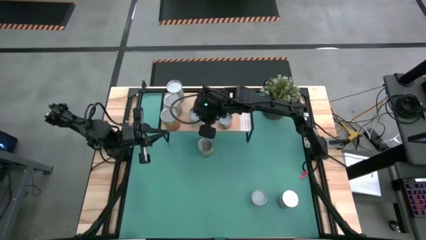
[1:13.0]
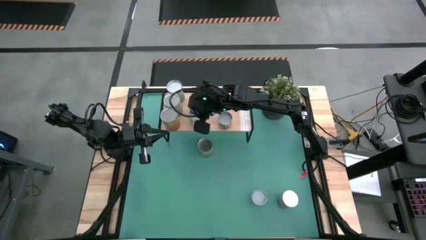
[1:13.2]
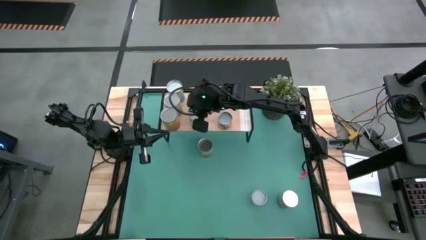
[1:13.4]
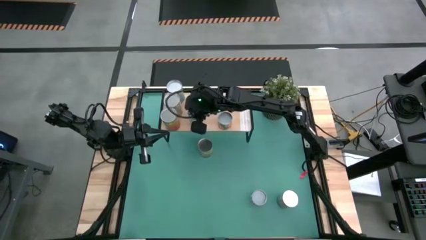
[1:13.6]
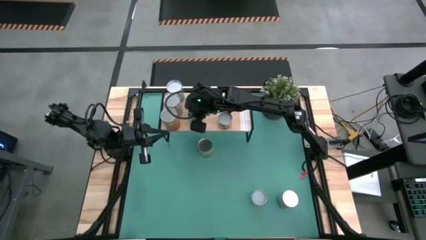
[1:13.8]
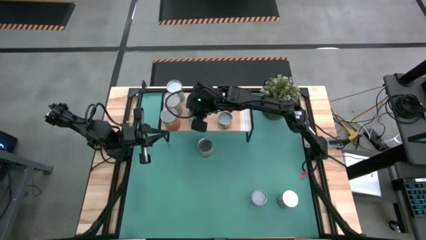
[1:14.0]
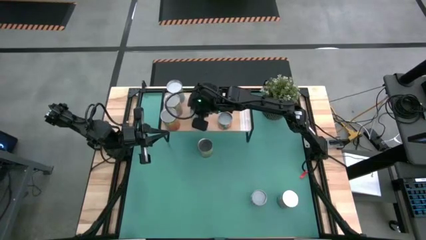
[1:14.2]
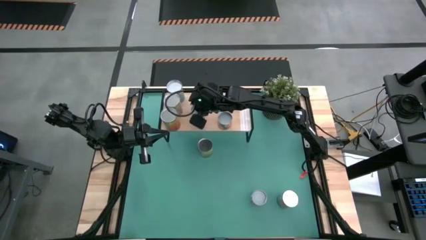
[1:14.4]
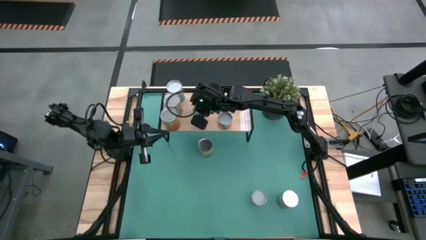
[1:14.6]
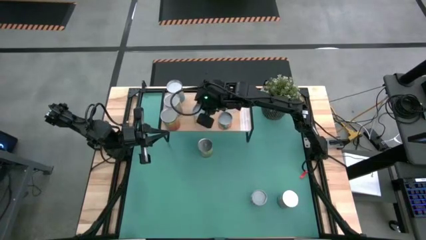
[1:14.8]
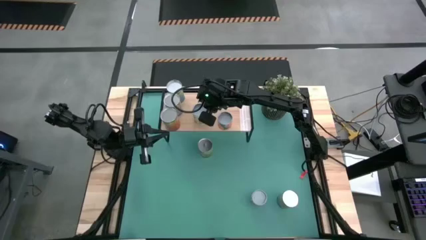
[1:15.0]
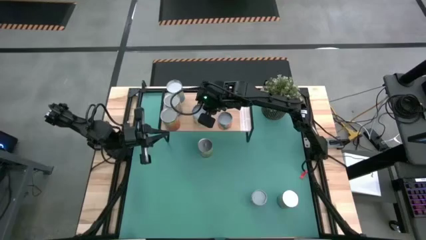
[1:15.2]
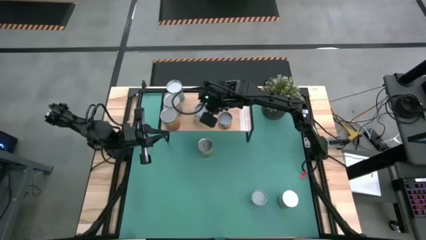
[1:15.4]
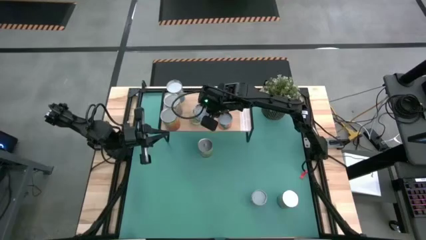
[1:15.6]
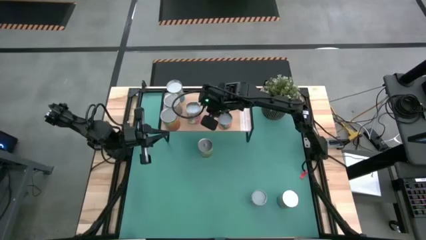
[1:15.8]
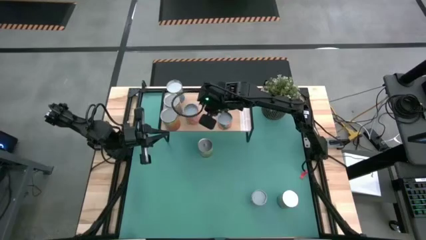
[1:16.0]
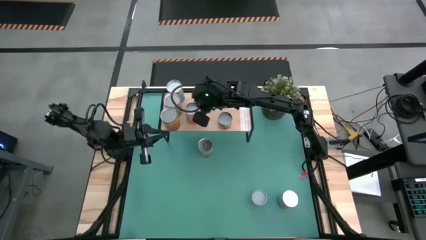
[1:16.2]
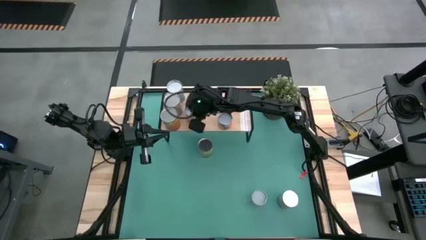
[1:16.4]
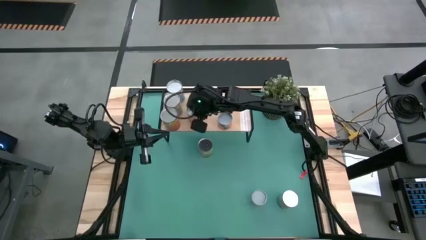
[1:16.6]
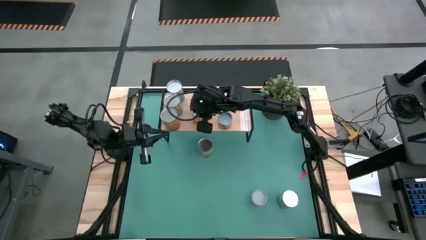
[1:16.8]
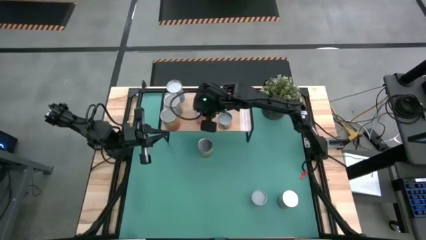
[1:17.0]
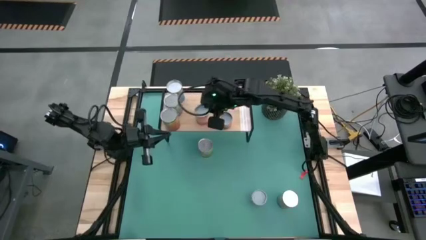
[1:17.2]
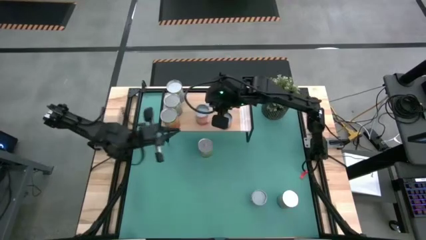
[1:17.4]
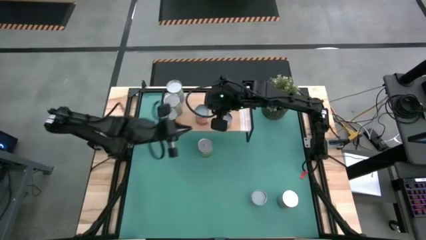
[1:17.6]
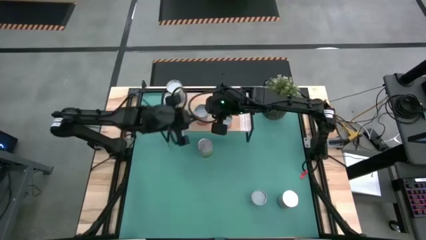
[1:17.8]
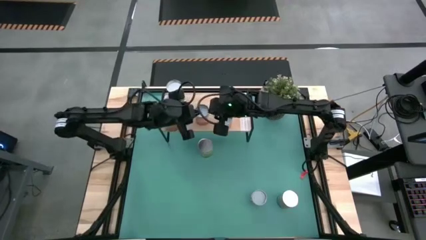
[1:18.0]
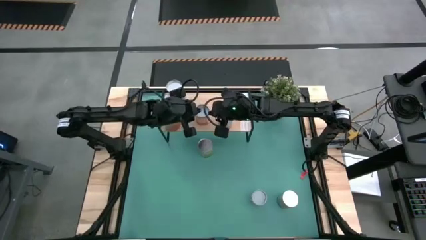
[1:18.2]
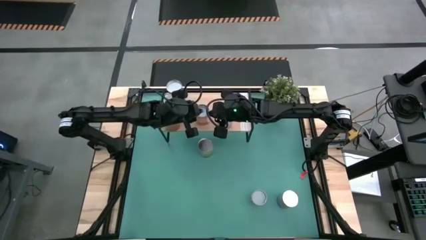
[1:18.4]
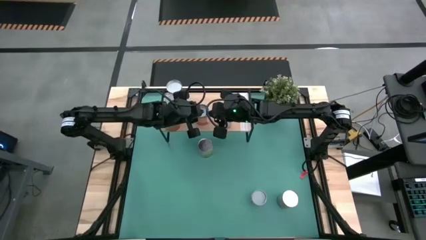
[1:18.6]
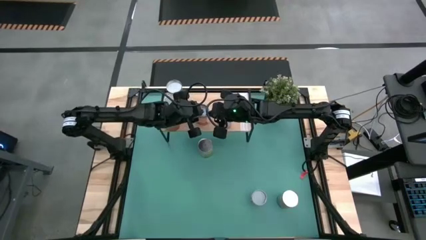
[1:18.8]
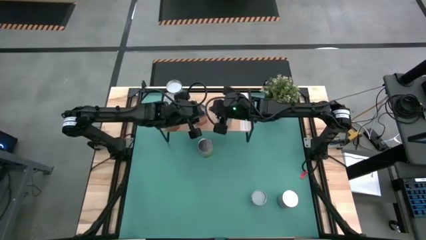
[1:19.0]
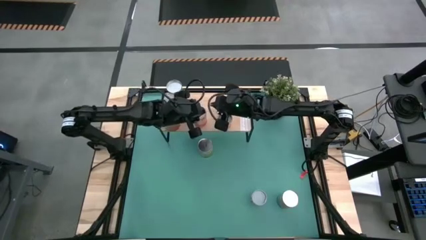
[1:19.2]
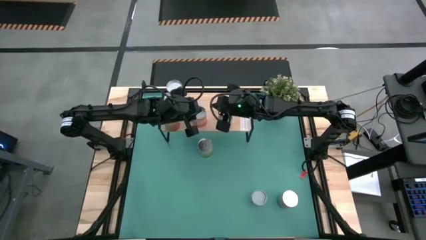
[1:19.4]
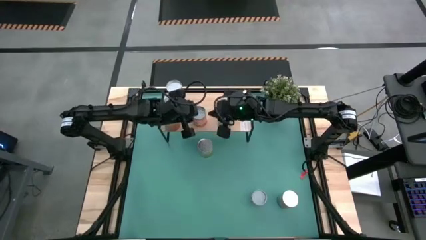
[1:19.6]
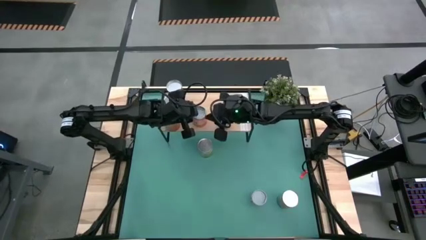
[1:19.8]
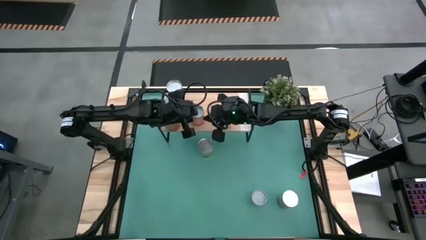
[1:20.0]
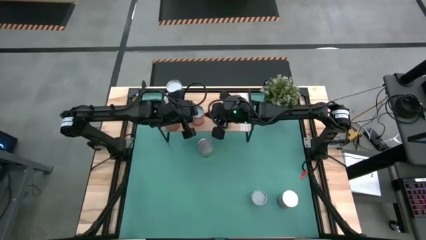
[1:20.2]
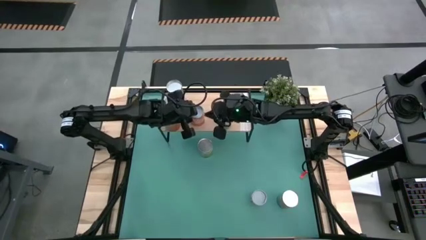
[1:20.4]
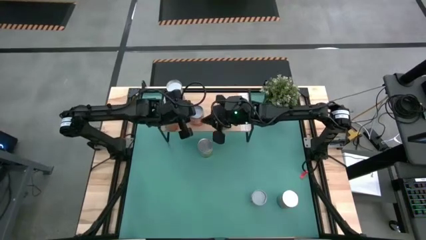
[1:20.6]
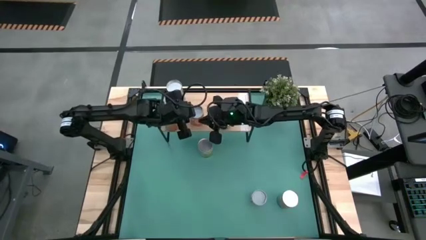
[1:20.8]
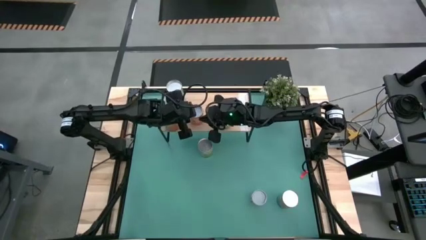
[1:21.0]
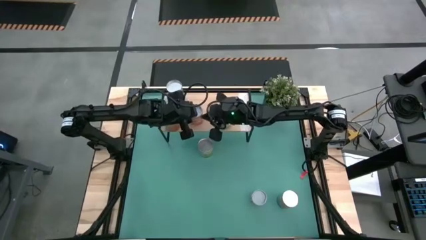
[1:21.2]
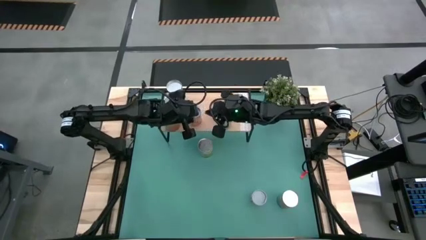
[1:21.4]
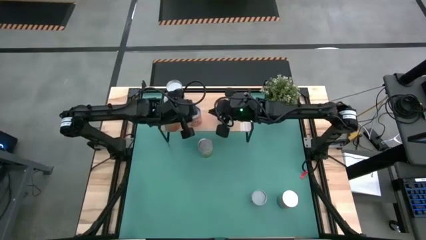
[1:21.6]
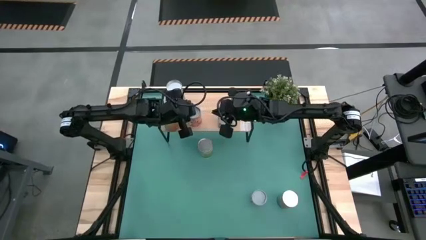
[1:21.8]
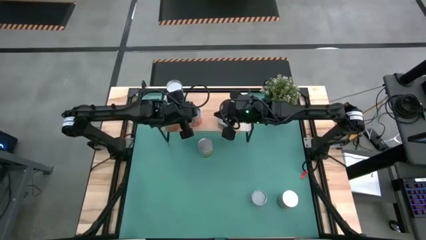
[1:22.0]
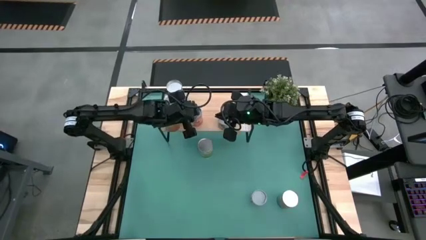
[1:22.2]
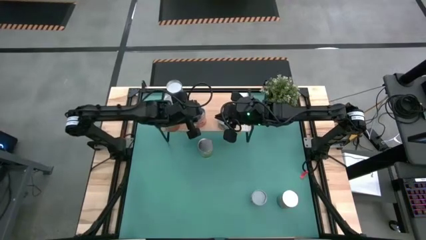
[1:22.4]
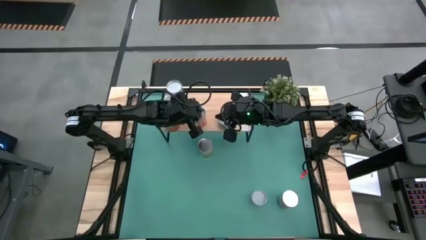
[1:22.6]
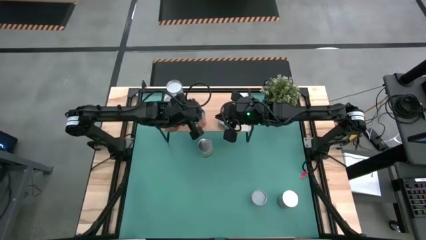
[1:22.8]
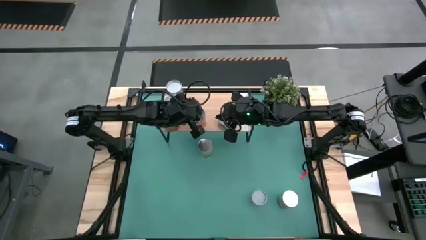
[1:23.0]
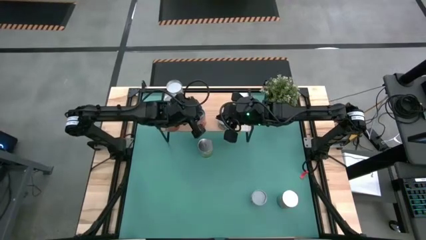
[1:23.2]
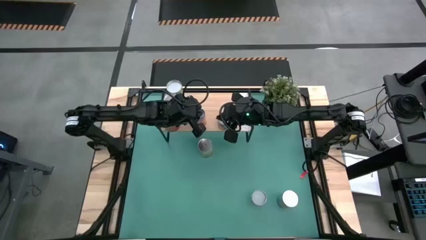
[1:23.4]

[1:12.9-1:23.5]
Task: Pick and place cans onto a shelf
Put the canned mixed fruit on the shelf

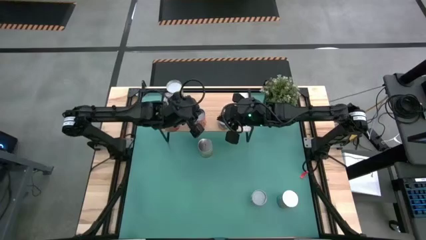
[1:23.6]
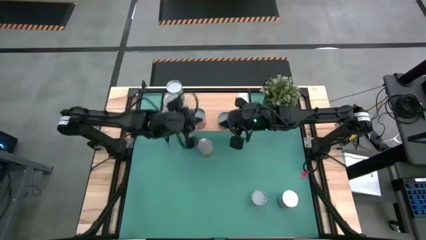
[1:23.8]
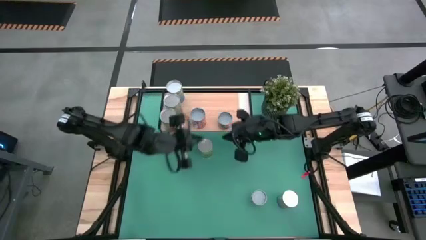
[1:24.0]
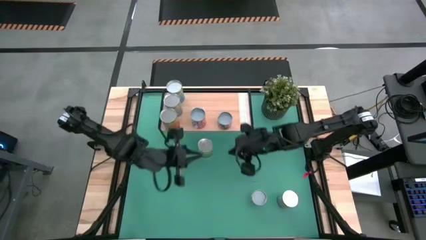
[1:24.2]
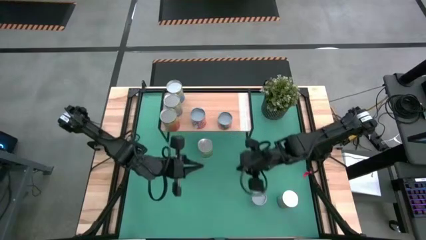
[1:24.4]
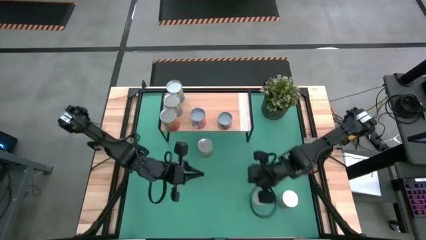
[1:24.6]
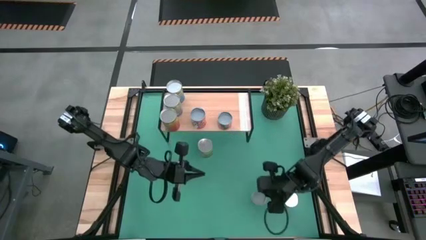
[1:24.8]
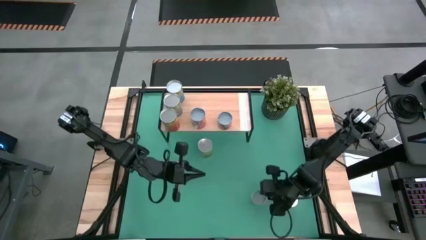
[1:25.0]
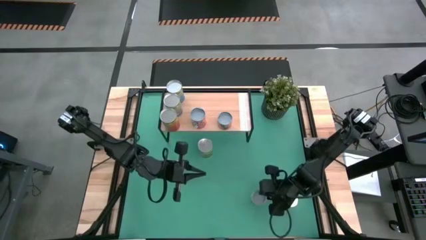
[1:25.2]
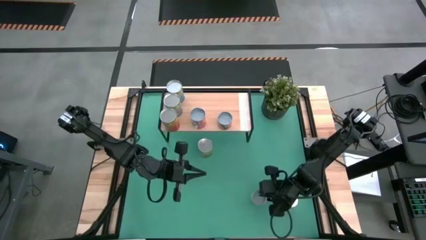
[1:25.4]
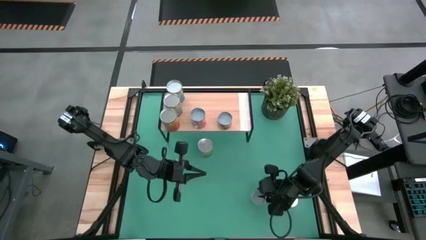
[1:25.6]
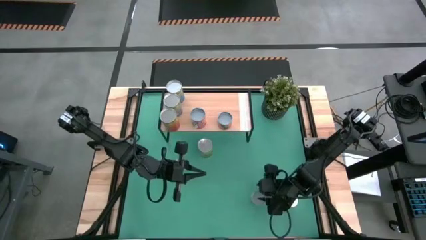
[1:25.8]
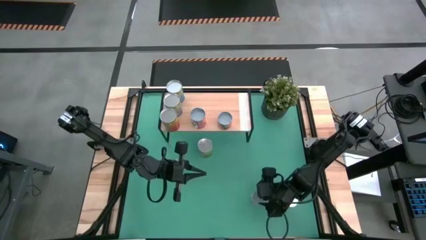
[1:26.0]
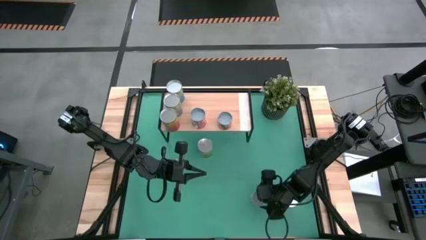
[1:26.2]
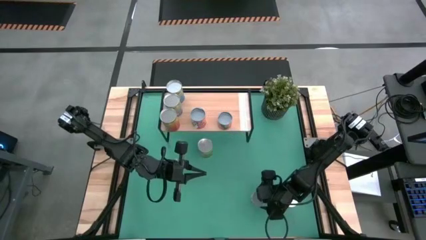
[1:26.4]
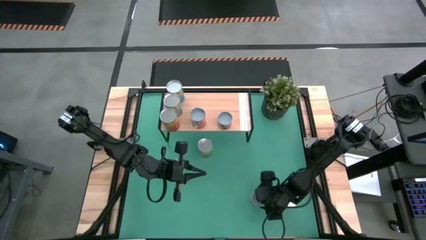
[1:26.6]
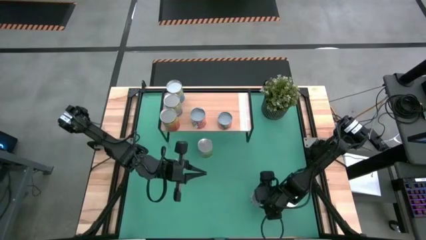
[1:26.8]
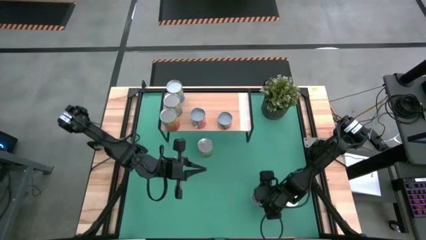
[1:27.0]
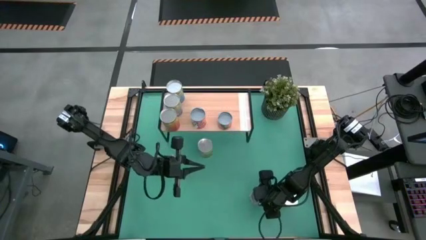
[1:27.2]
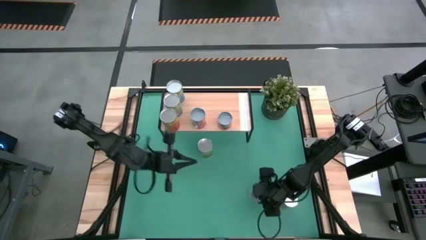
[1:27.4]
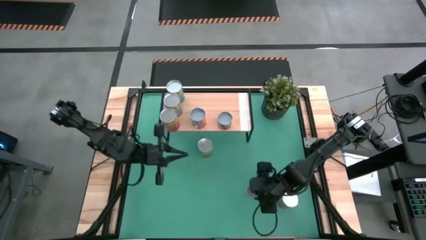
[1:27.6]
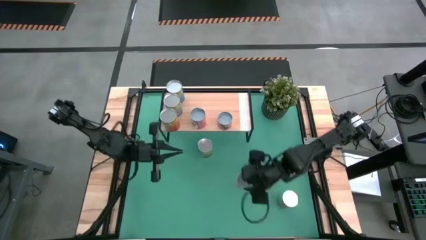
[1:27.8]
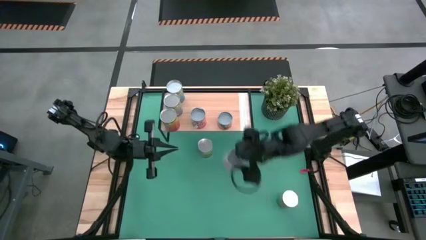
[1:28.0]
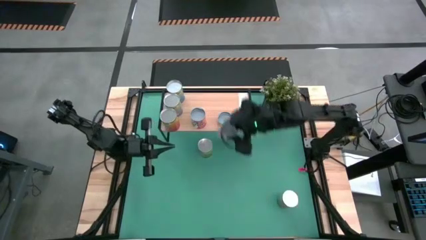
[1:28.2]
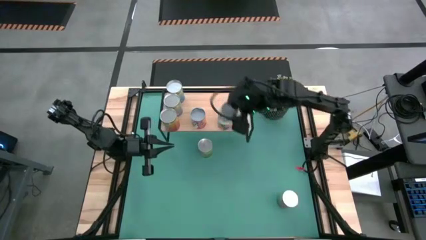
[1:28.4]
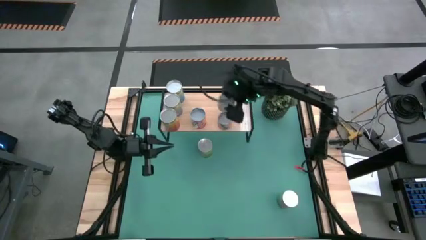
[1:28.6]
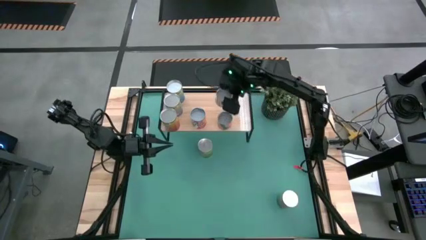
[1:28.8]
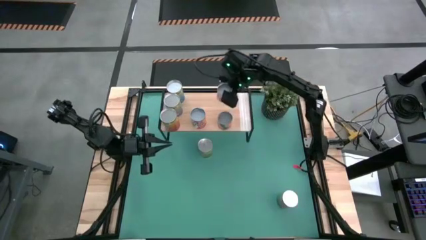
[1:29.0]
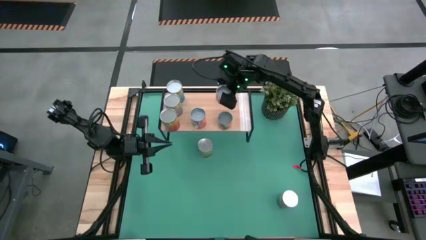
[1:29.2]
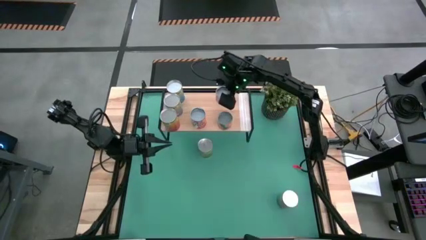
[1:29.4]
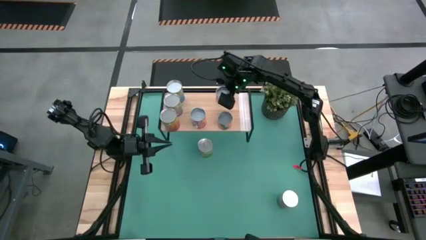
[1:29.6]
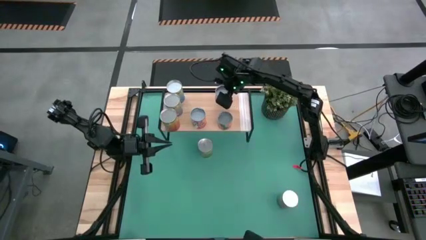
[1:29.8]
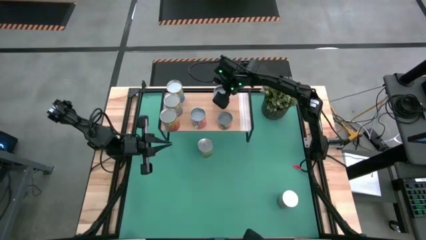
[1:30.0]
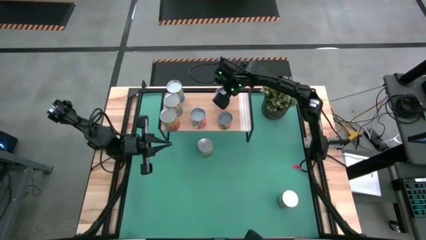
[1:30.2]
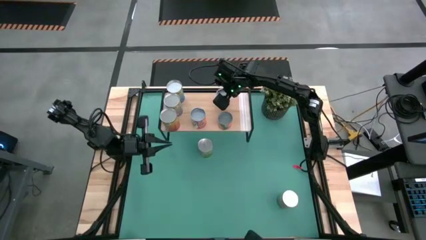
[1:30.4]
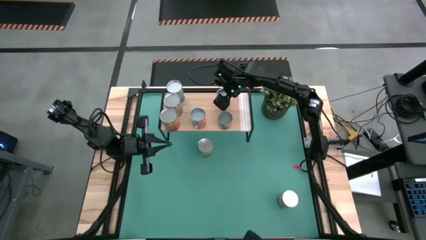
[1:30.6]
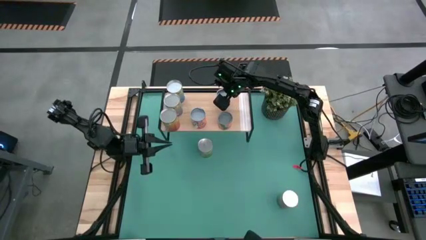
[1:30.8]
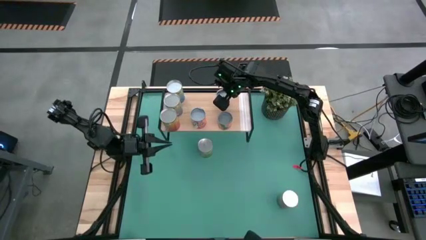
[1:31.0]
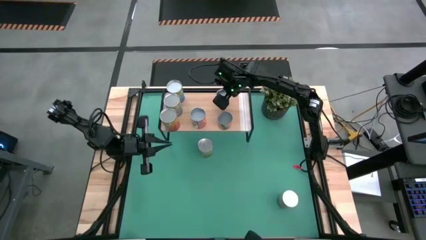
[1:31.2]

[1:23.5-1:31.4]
Put the canned mixed vegetables on the shelf
